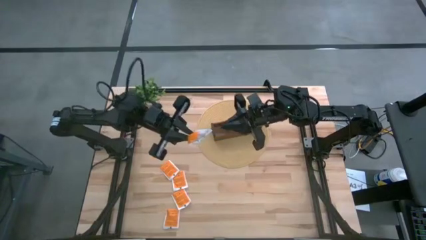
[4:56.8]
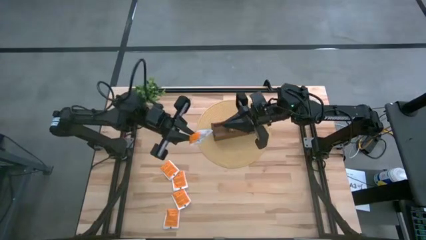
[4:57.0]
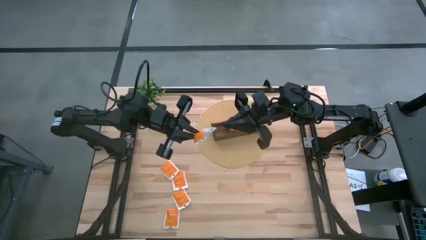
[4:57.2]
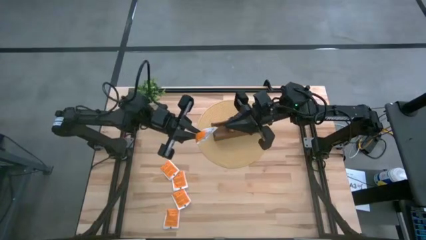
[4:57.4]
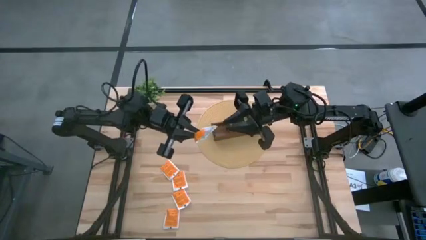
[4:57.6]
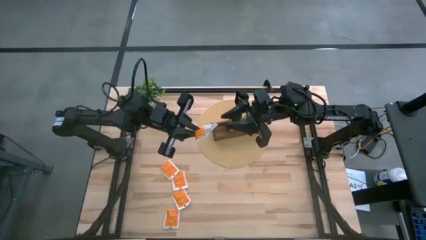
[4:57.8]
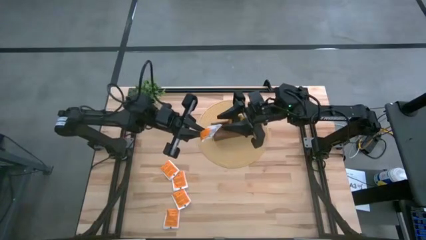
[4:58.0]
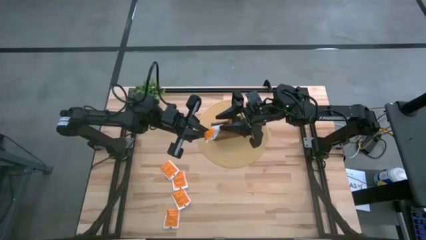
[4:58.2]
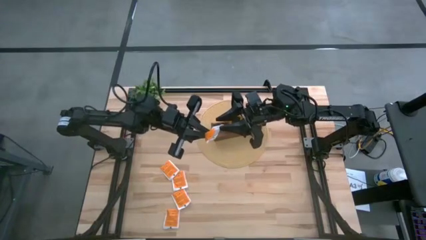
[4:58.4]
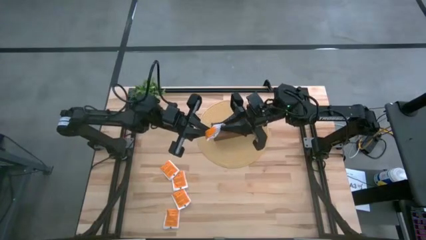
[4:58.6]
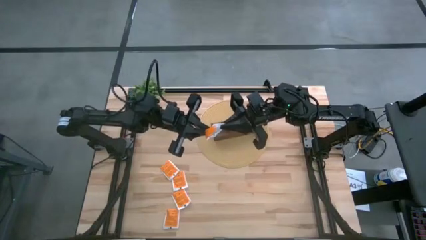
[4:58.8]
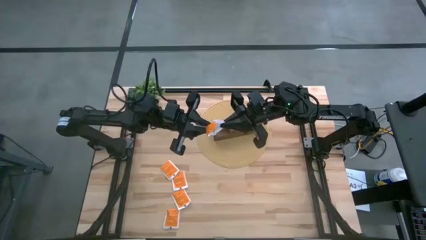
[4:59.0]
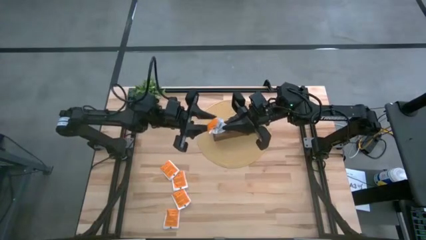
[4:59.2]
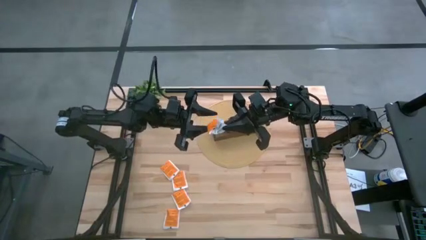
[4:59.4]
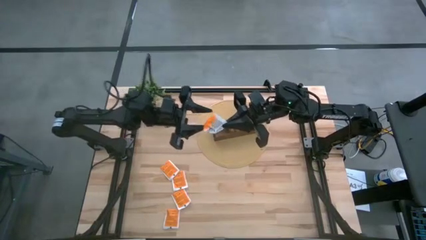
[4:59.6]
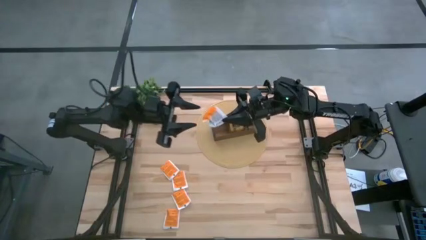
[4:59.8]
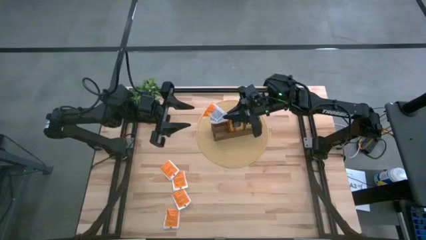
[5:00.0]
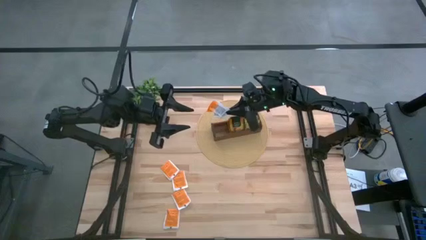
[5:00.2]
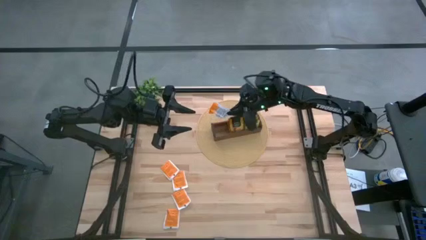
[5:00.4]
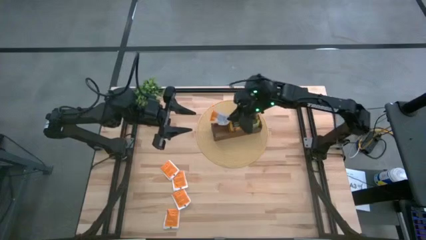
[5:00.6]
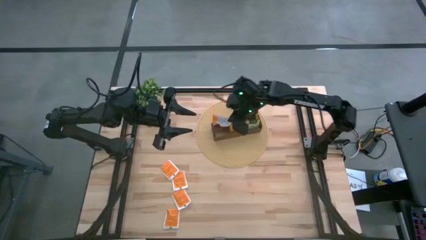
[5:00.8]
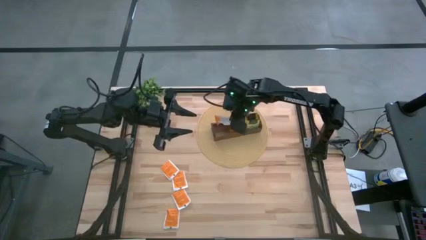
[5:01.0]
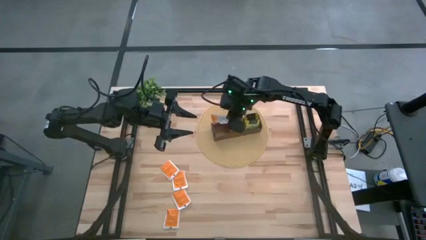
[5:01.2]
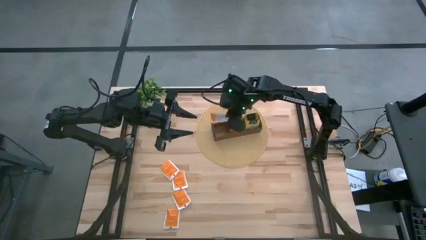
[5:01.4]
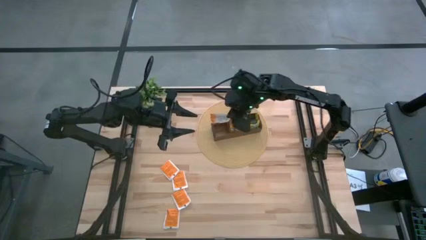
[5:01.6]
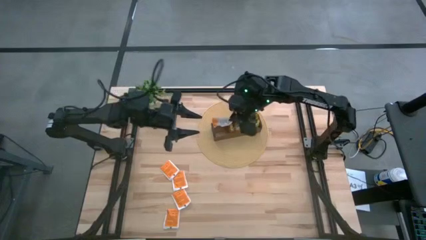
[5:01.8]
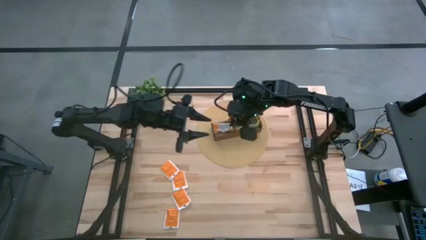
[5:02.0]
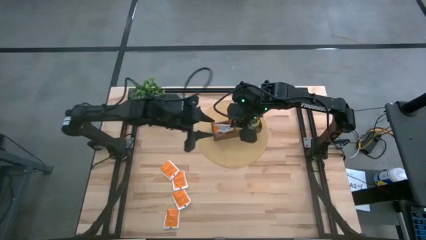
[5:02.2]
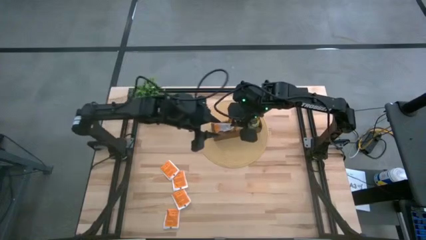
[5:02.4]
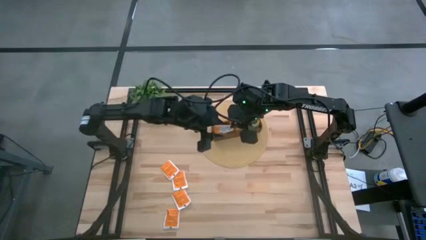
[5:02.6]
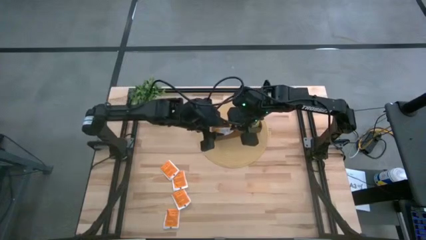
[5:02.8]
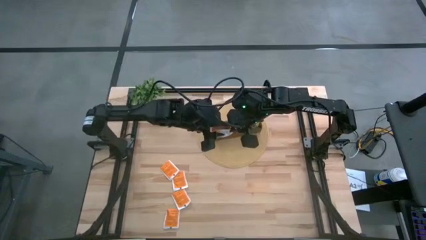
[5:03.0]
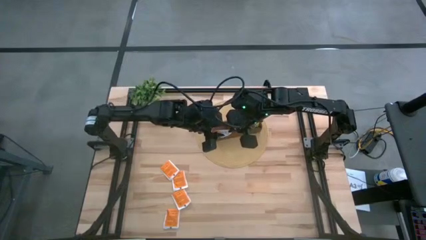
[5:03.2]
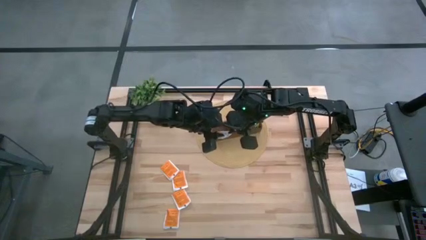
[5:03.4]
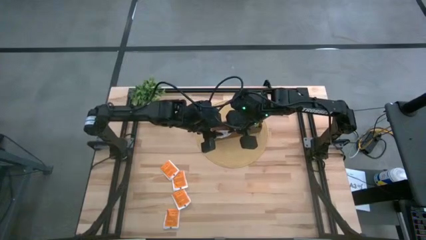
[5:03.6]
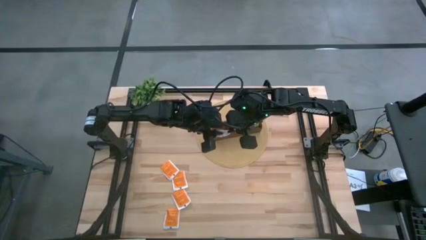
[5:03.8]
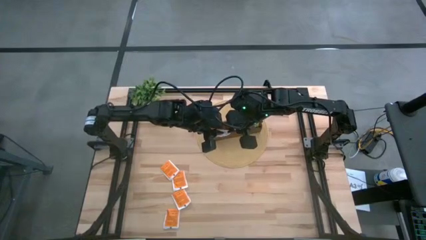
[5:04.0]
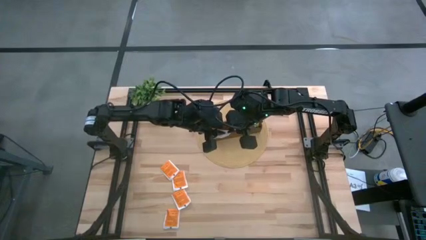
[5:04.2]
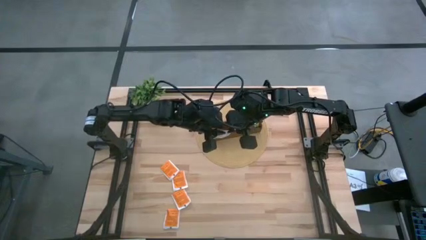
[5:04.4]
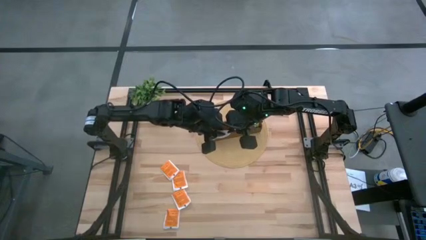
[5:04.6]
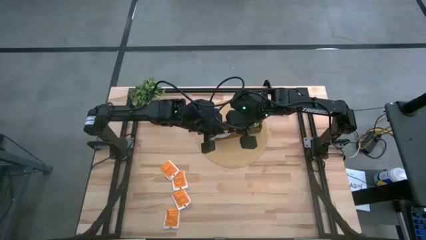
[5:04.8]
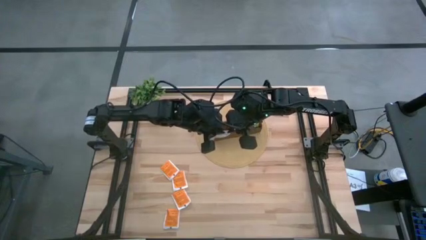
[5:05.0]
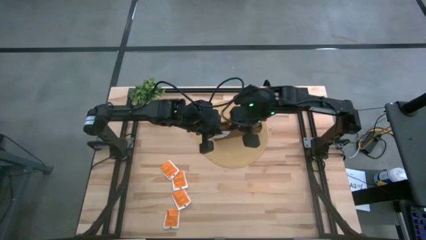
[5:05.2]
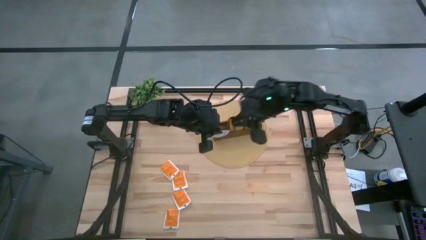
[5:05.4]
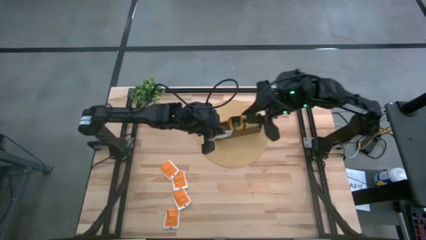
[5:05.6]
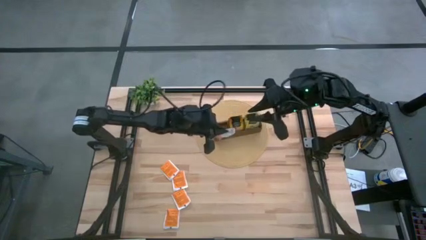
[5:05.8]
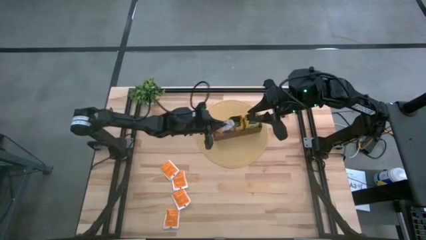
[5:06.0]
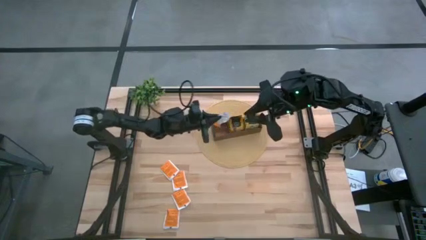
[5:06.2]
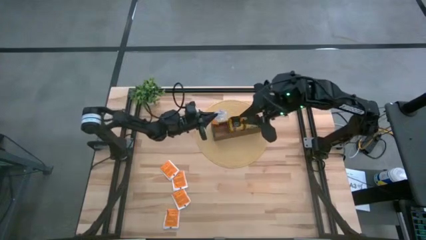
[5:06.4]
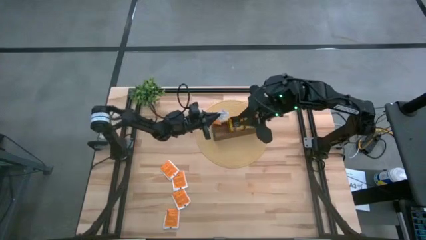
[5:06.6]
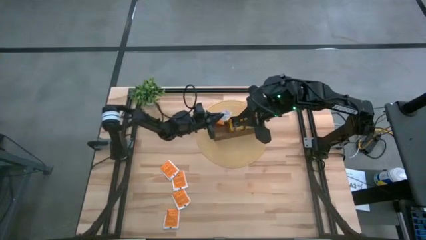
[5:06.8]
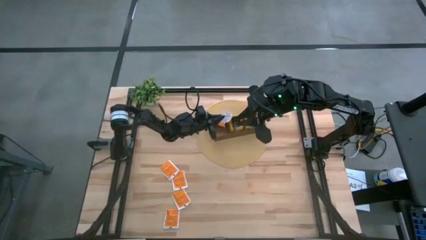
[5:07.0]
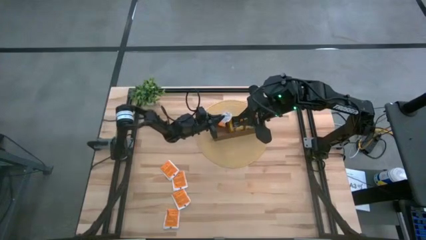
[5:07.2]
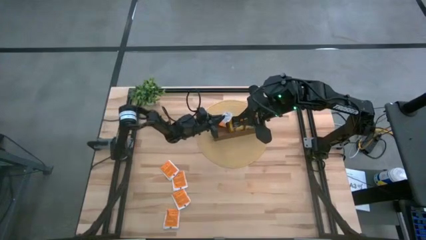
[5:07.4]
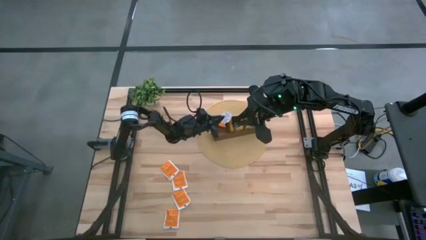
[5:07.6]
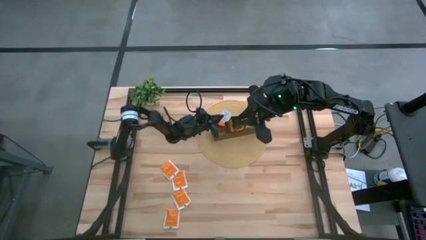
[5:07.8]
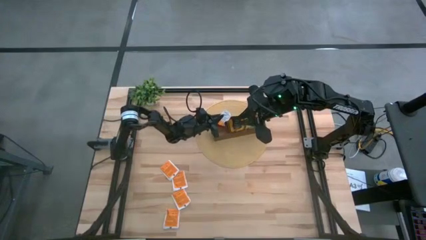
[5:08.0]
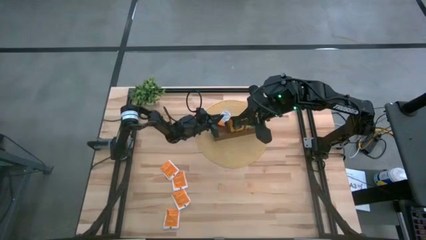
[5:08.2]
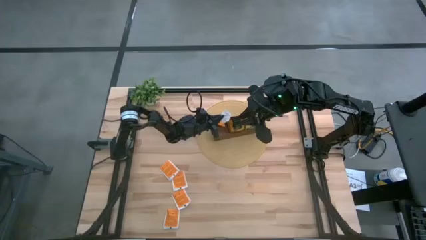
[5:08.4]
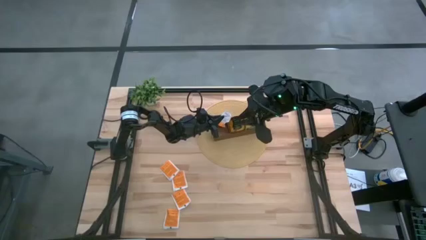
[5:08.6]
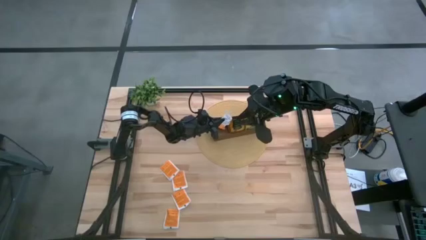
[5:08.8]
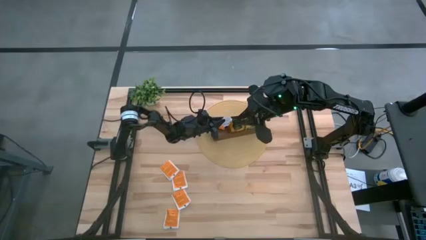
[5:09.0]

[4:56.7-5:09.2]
Task: Pick & Place Tea
Put the white tea bag into the left section of the wooden organizer

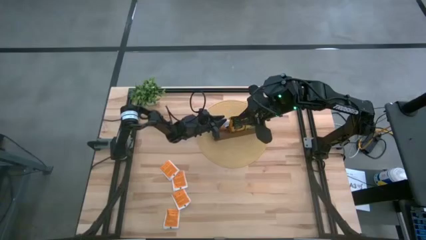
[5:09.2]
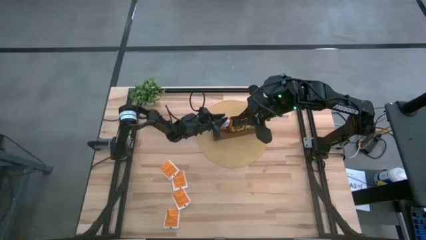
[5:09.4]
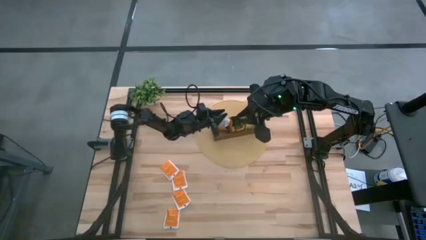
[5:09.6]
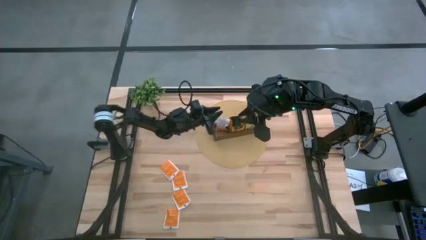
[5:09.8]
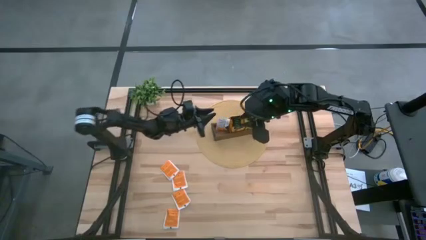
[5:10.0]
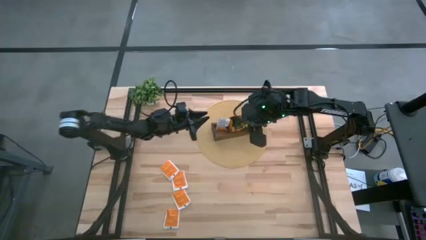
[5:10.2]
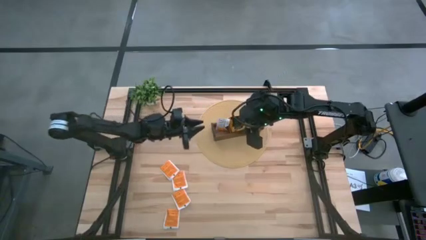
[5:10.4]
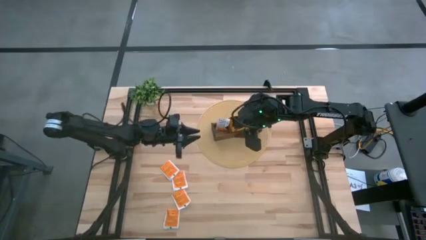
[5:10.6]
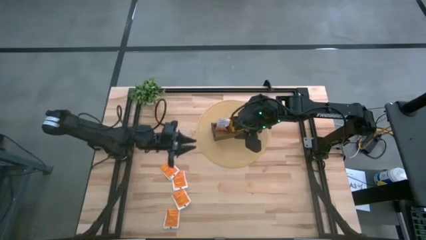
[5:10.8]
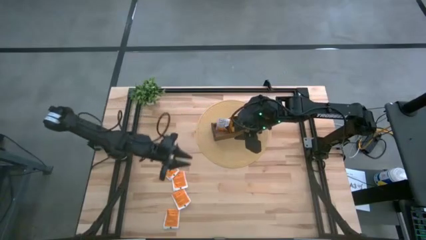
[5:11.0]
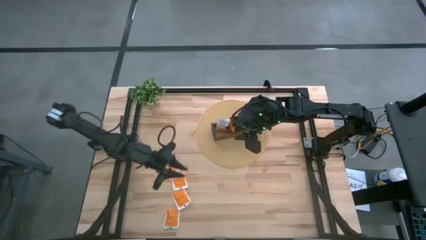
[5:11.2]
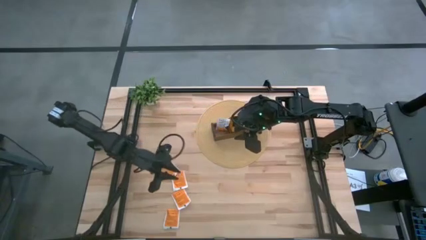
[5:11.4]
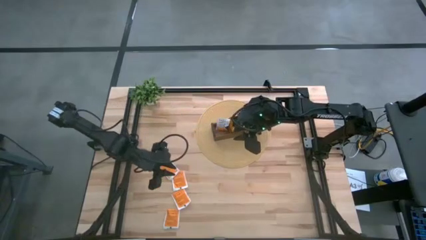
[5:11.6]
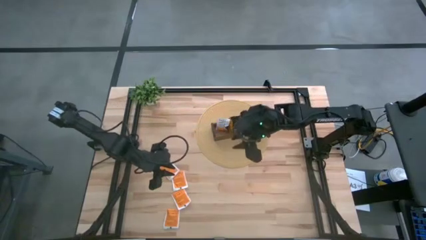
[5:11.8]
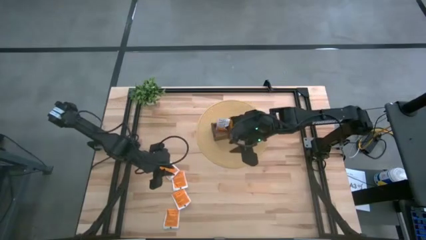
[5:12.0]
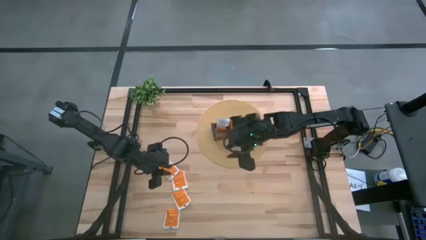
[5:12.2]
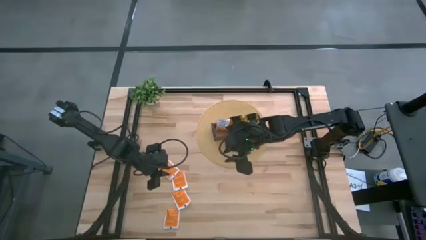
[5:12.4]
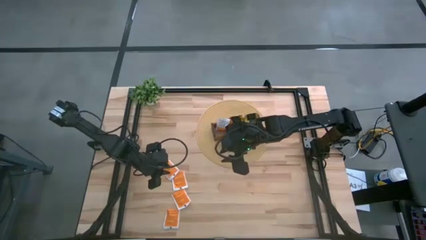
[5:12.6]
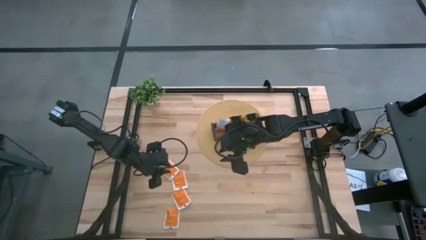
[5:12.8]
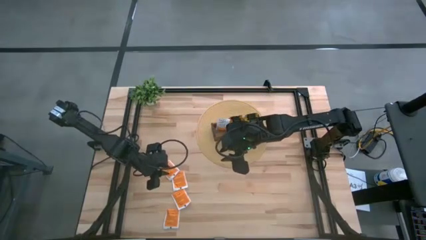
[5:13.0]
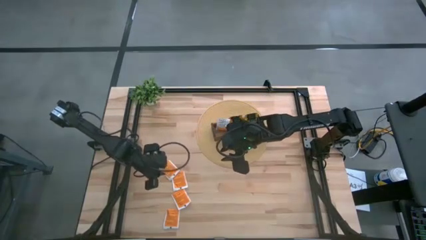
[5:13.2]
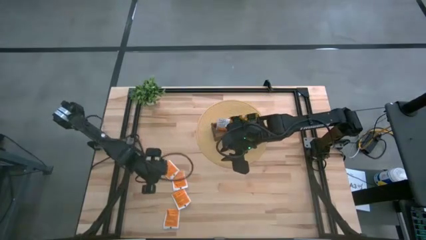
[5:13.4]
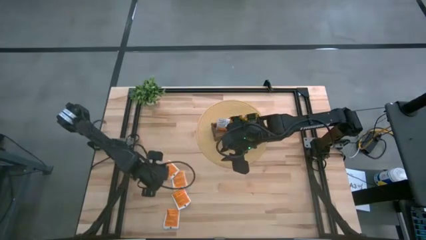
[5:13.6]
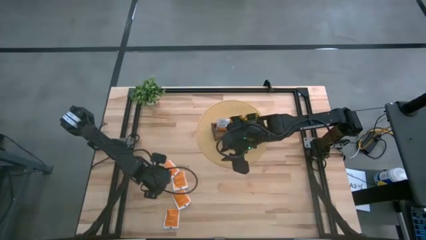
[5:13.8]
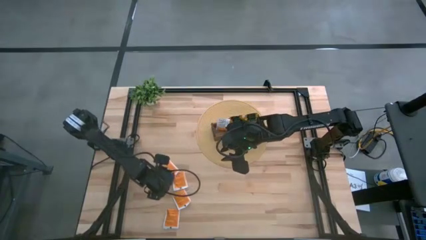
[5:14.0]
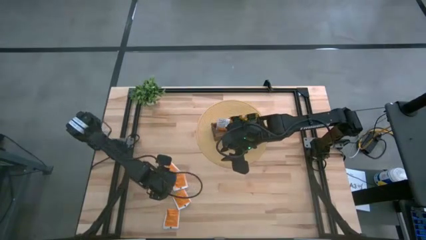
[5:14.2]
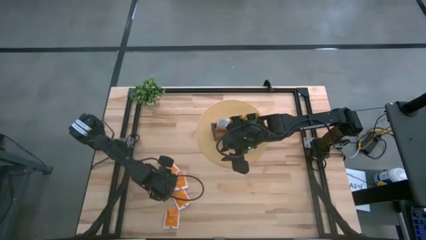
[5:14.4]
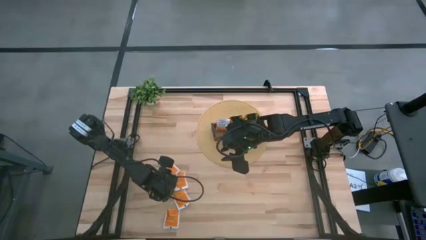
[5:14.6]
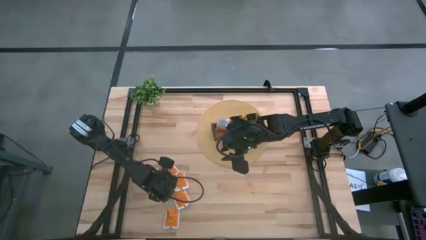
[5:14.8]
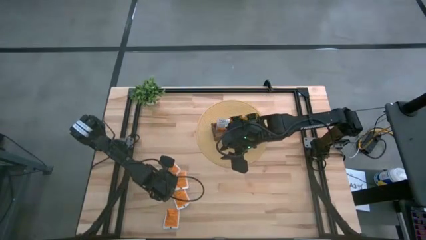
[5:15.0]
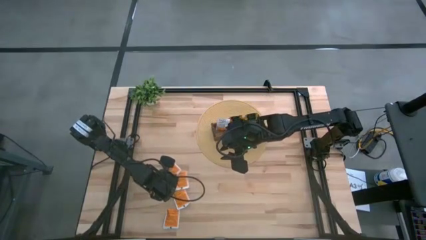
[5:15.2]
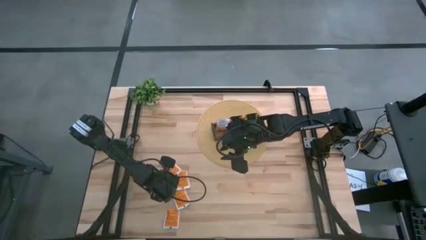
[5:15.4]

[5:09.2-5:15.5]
Put the white tea bag into the left section of the wooden organizer
